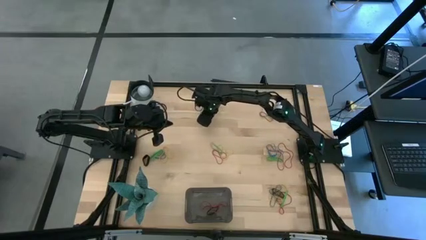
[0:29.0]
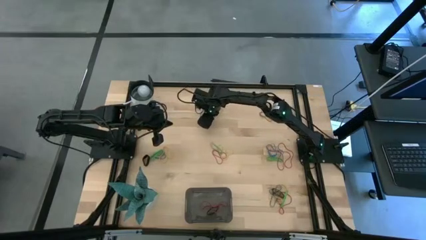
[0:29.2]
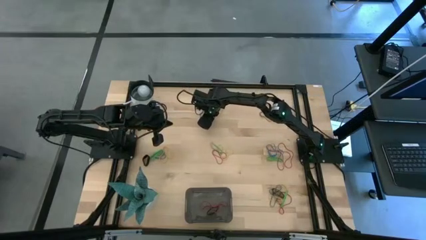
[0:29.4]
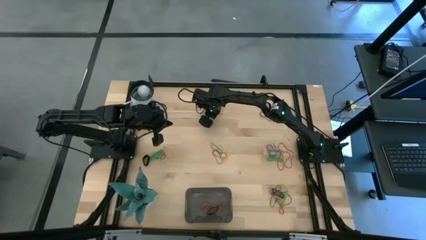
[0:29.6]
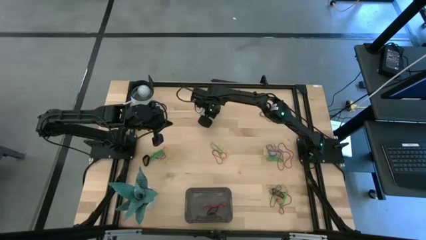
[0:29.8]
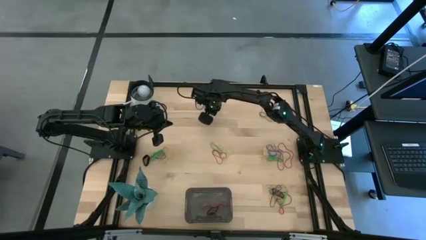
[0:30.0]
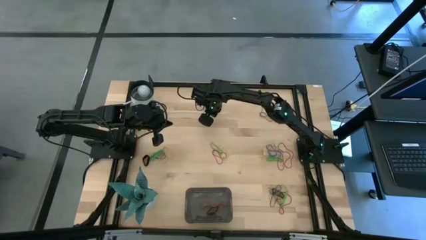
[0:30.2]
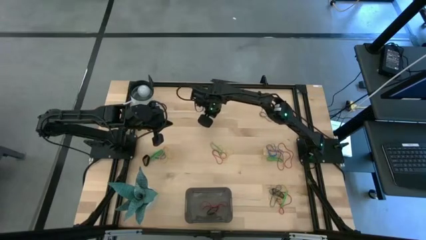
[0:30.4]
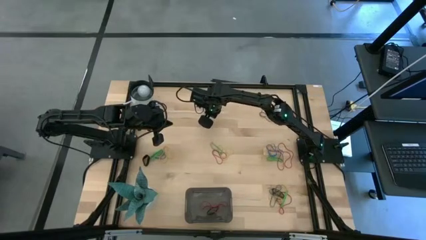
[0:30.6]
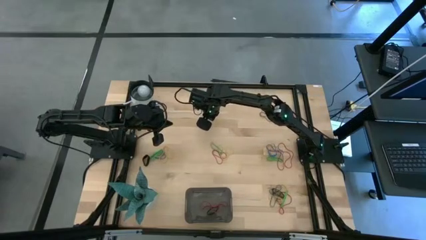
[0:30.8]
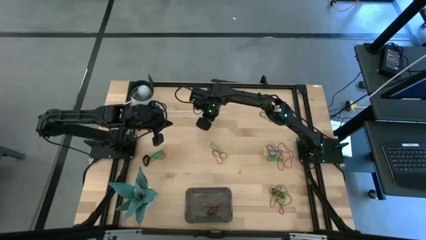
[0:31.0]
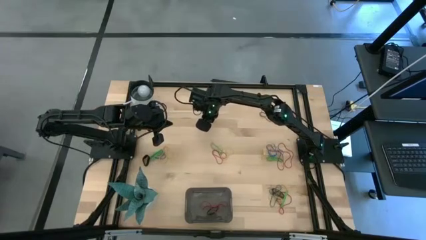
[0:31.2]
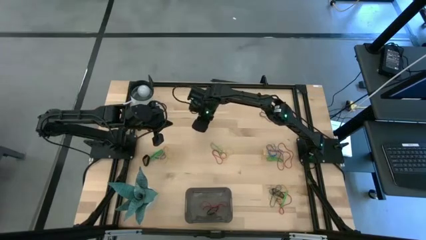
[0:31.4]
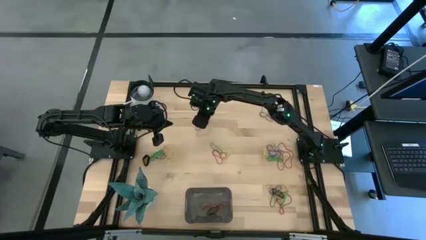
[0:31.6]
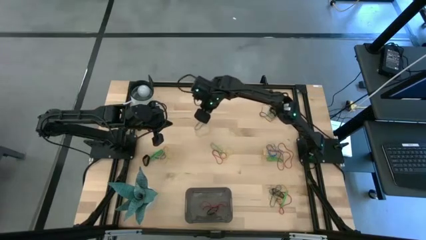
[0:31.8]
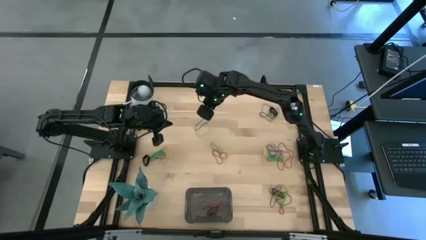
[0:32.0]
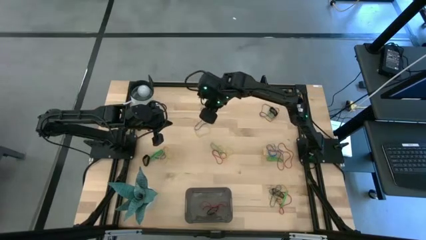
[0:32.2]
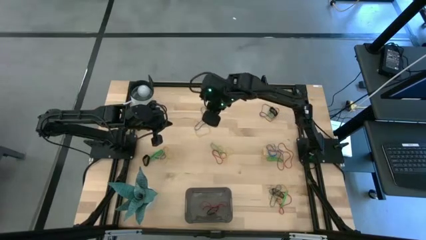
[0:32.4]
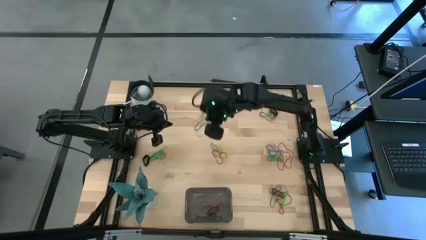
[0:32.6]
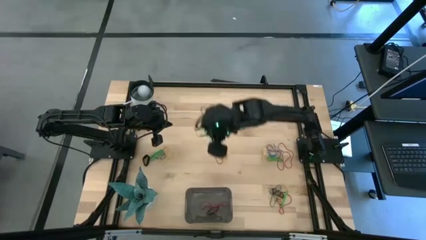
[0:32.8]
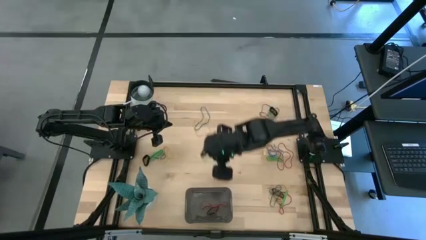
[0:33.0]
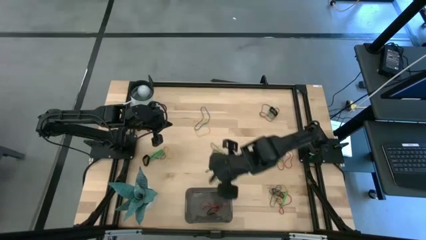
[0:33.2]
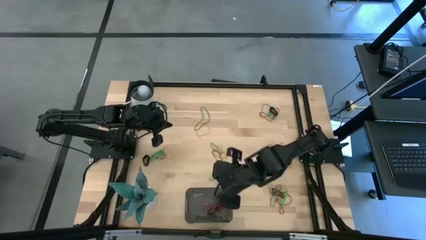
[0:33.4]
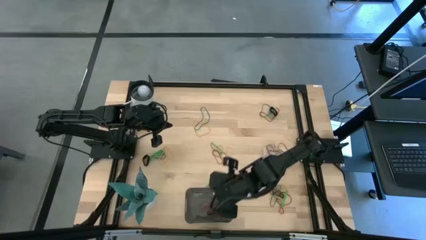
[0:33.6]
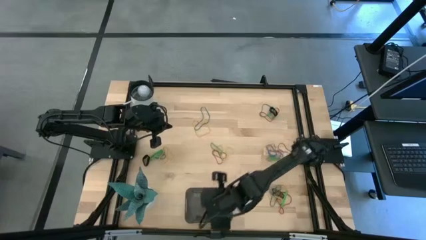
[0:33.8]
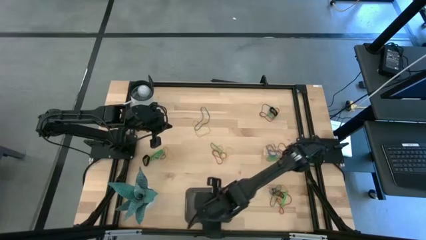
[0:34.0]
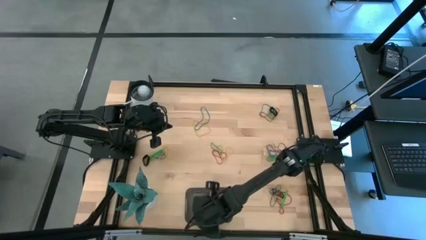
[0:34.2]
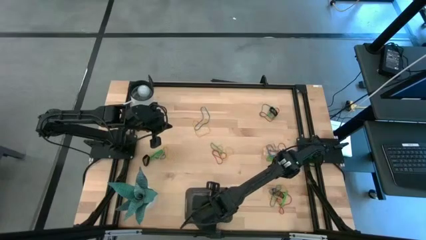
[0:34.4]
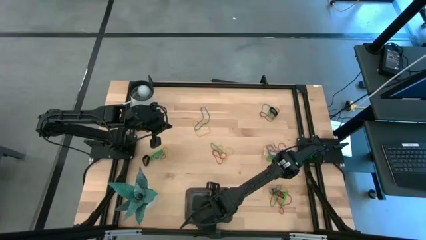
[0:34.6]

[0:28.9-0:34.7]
Task: Pick and place rubber bands into bin
Put the green rubber band into the black bin

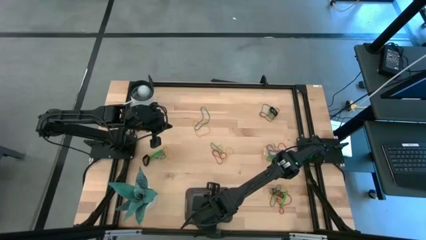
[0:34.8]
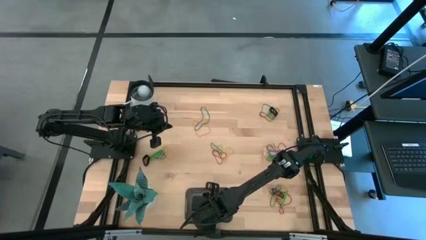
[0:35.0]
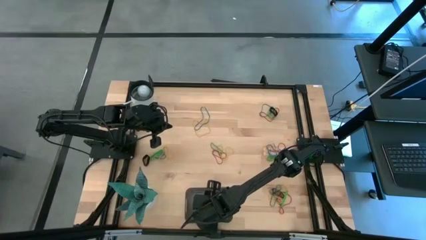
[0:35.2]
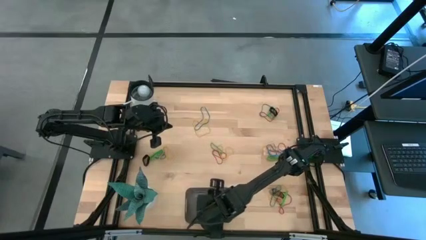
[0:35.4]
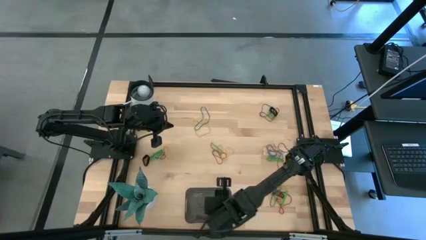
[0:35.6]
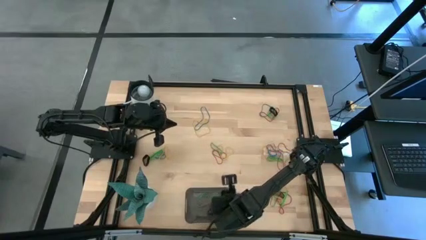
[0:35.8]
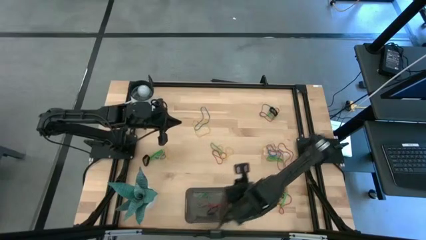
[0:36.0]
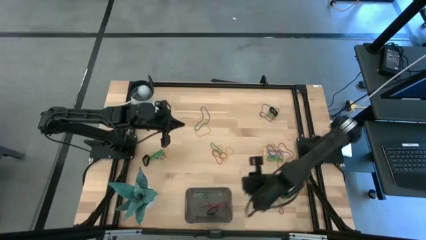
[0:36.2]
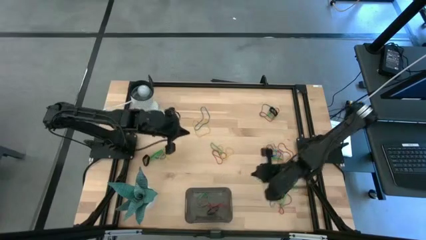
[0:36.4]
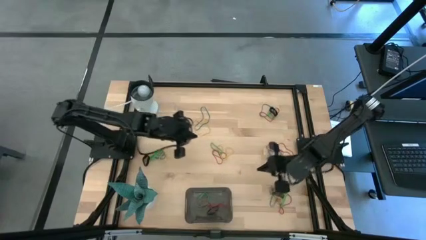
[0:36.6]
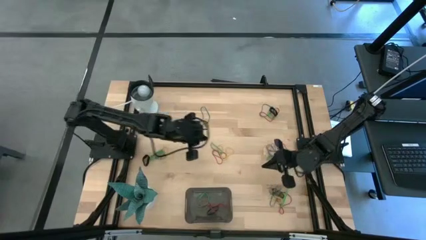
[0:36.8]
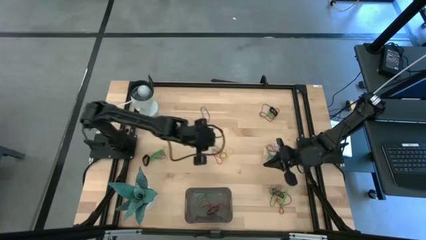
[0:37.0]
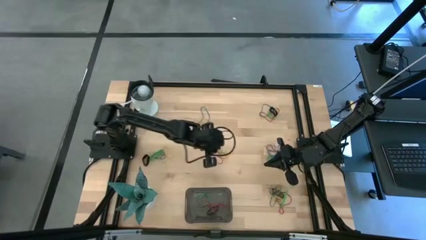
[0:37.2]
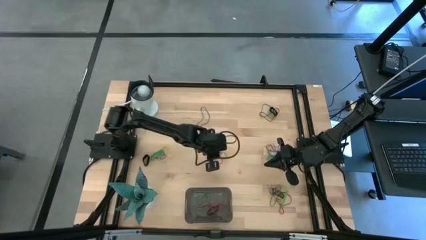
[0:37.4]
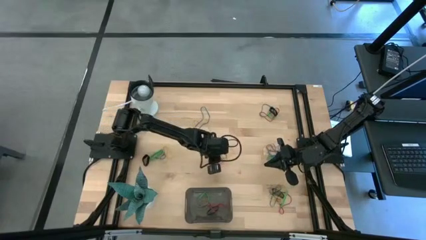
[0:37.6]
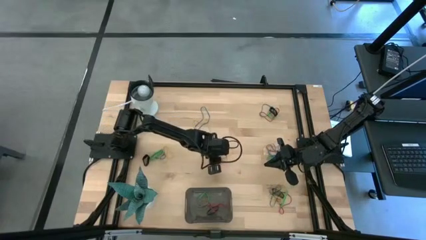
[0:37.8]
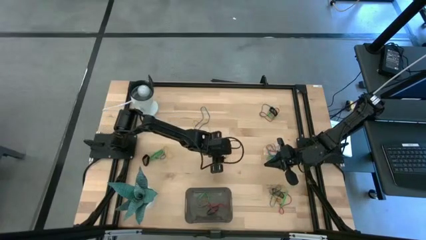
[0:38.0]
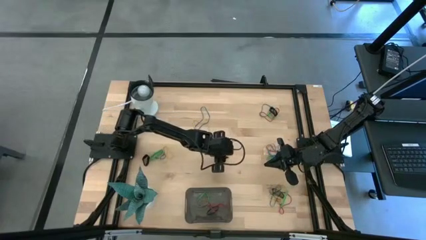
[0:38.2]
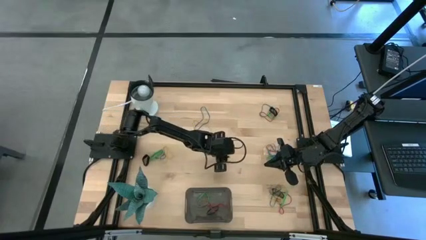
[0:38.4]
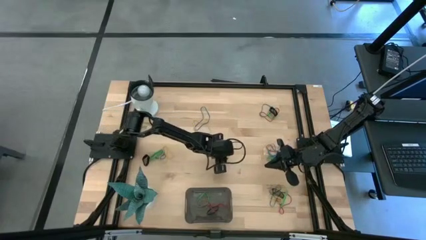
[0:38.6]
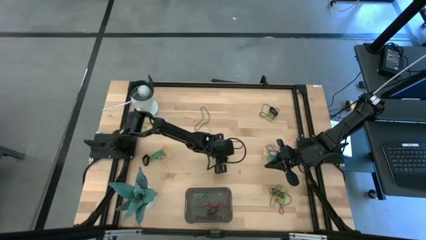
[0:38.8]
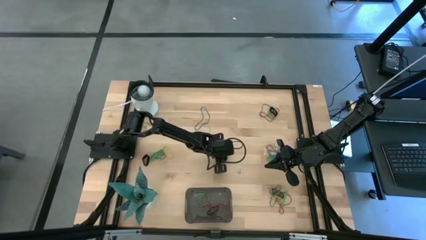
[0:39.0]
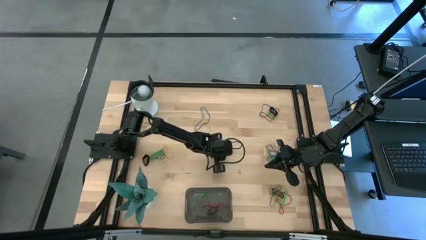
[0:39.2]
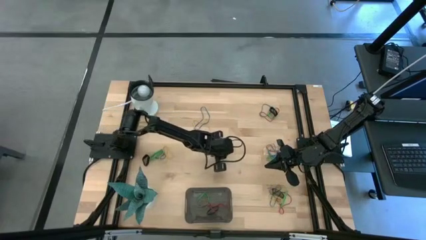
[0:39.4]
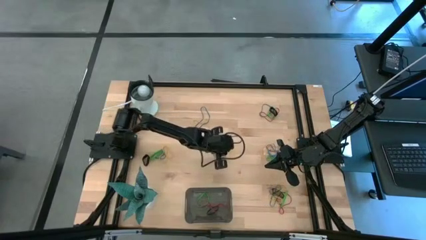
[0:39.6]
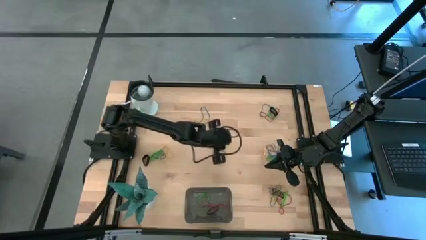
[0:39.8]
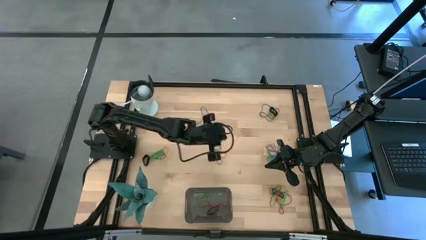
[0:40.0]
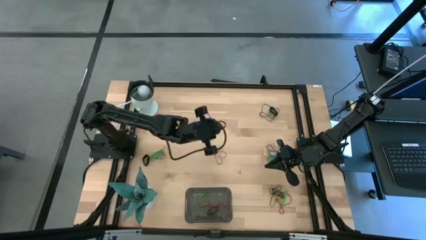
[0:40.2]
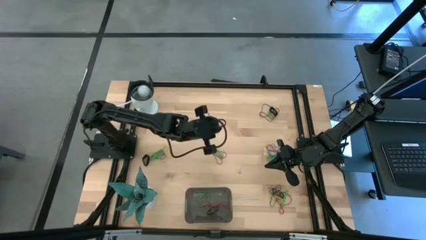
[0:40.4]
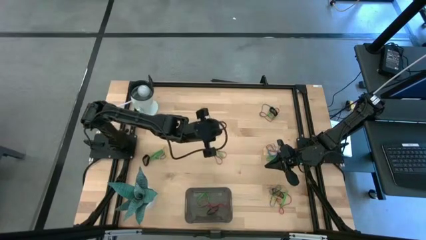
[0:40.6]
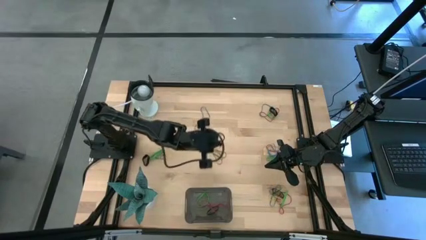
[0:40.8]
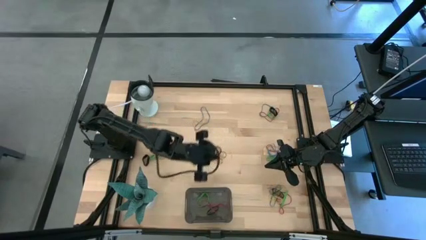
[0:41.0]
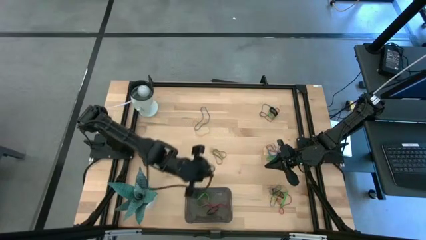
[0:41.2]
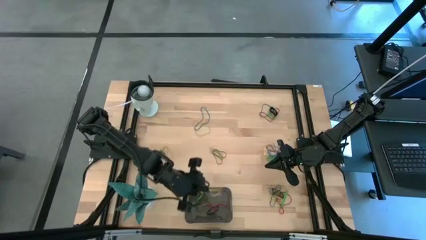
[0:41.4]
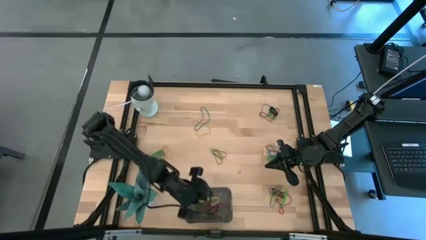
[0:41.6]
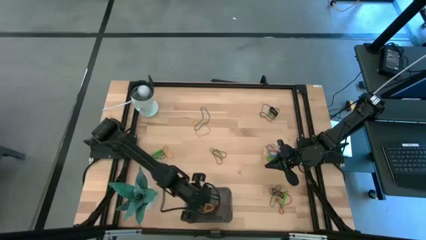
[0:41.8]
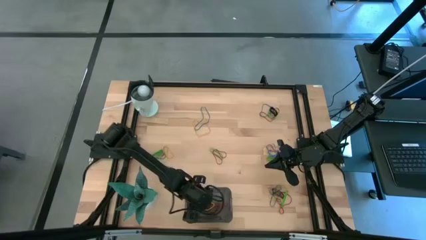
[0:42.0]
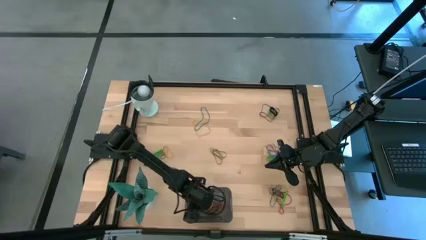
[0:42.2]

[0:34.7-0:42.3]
Put the yellow rubber band into the black bin

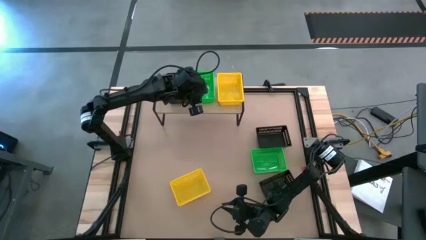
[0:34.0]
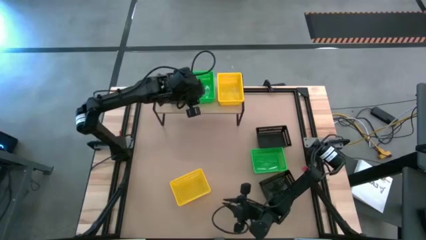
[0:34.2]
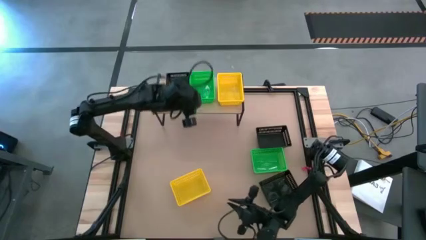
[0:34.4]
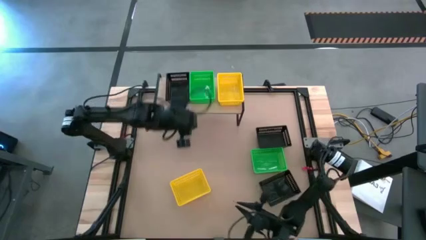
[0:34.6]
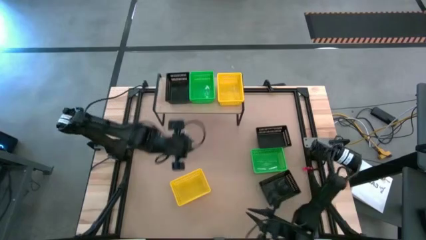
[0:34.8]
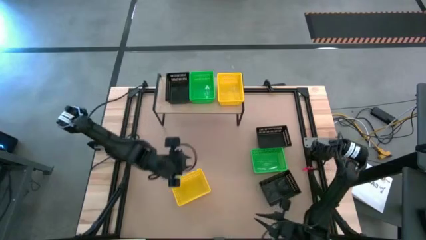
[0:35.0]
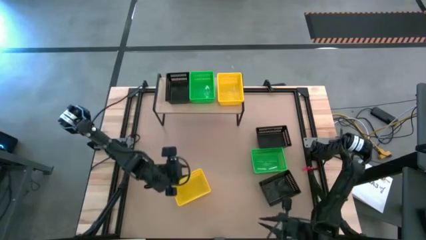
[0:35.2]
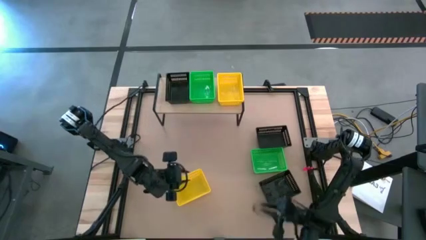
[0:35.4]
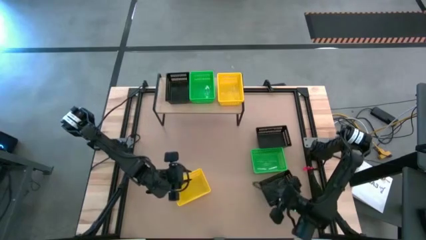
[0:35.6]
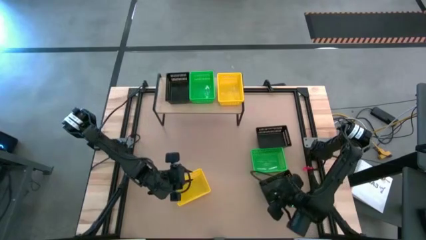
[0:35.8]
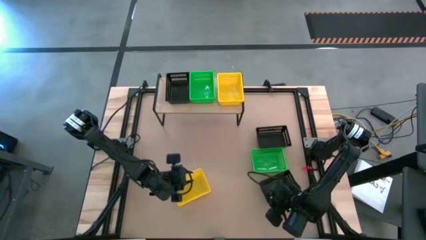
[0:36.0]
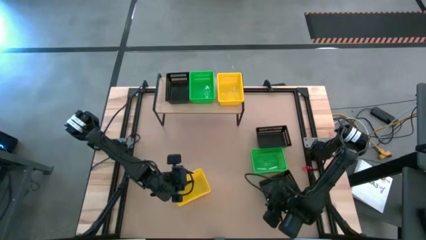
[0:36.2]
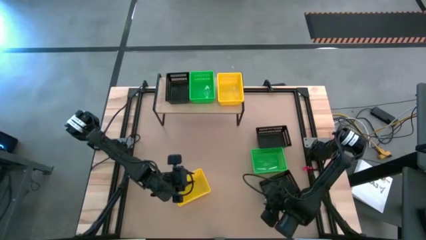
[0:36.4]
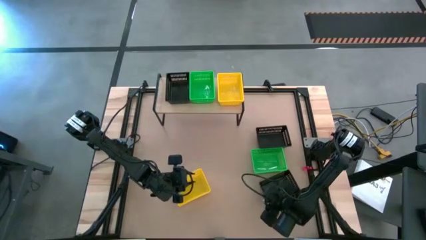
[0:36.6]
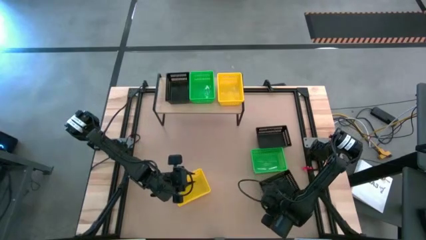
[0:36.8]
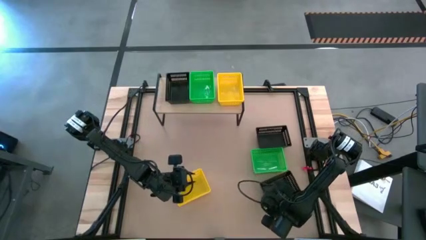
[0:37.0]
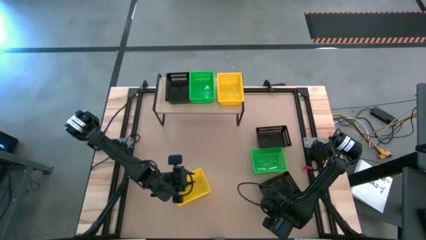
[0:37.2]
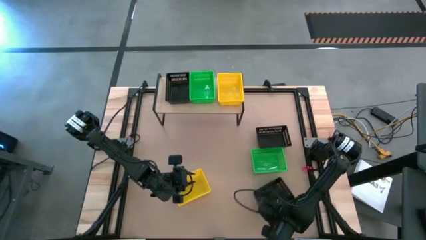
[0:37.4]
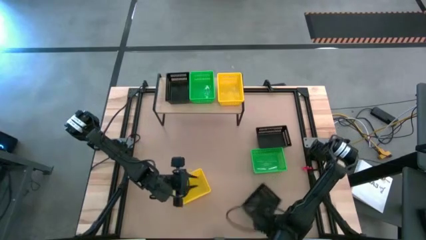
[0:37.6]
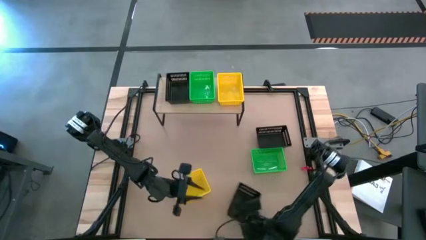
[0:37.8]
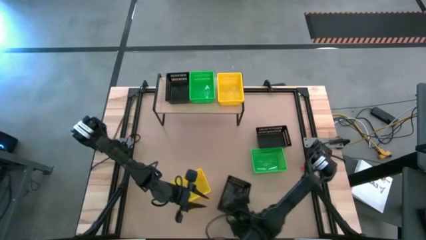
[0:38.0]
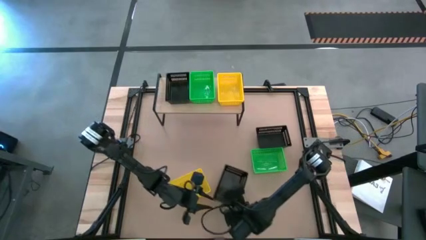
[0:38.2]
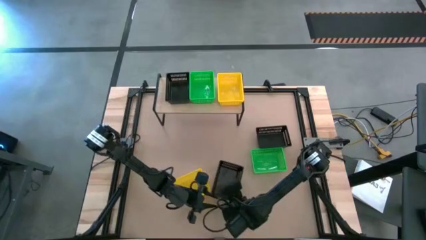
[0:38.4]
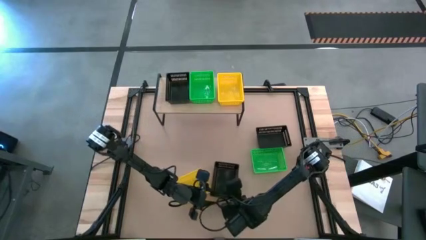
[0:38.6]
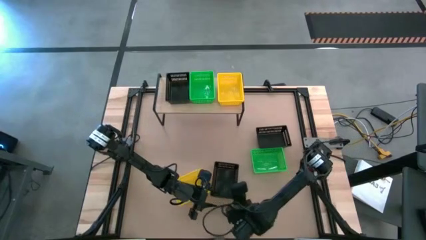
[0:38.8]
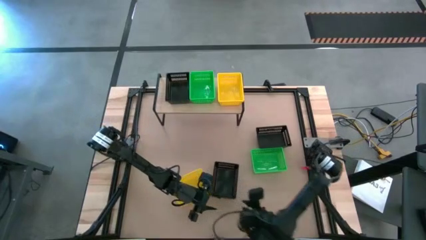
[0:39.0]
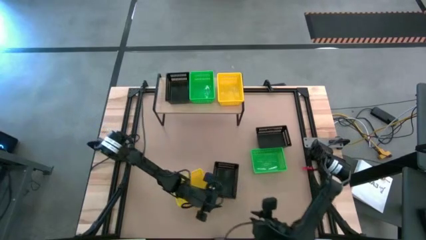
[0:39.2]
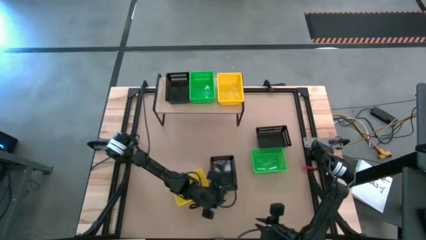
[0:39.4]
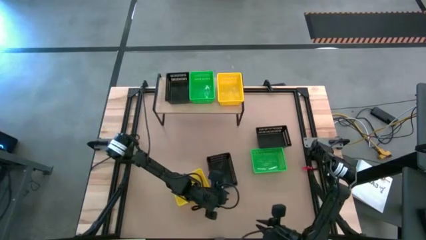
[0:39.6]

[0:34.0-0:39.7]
Task: Stack baskets on shelf by color
Stack the bottom black bin on top of the black bin on the shelf
